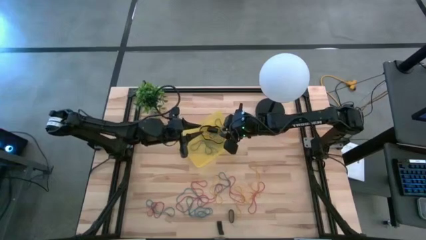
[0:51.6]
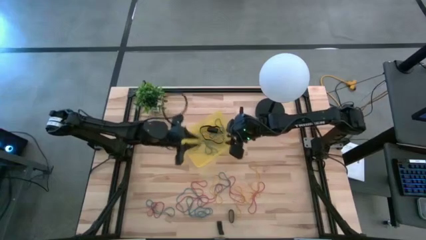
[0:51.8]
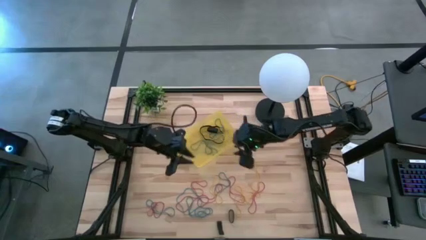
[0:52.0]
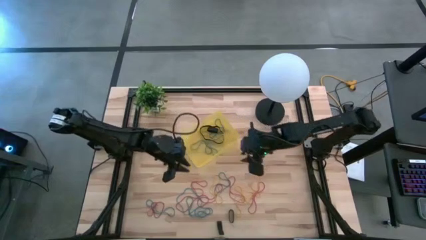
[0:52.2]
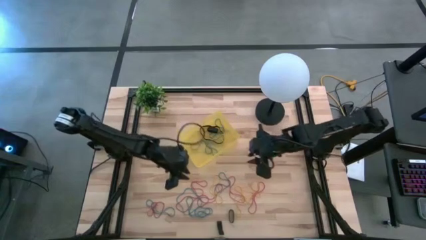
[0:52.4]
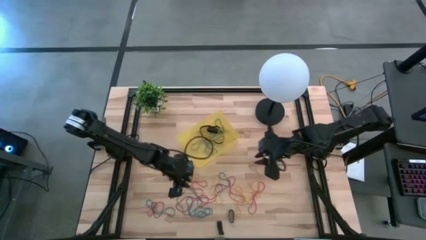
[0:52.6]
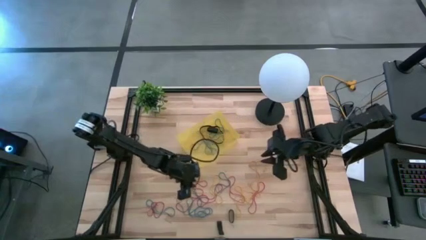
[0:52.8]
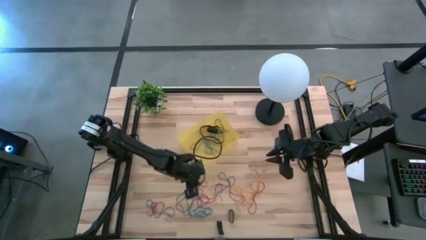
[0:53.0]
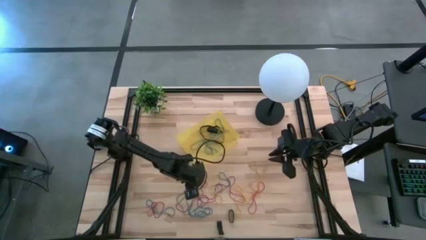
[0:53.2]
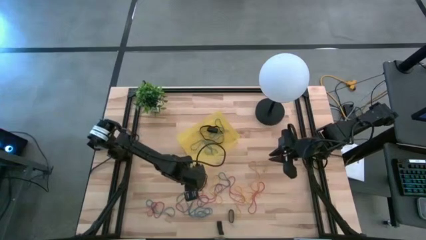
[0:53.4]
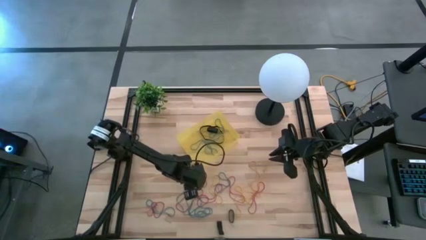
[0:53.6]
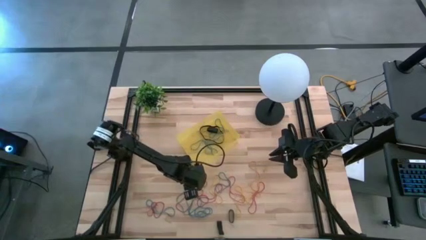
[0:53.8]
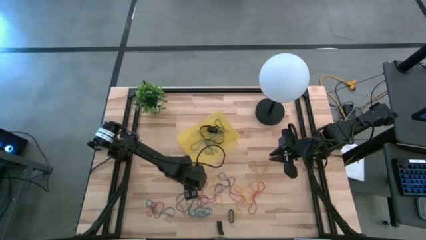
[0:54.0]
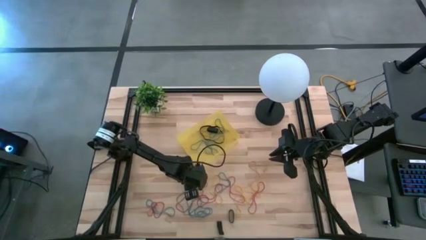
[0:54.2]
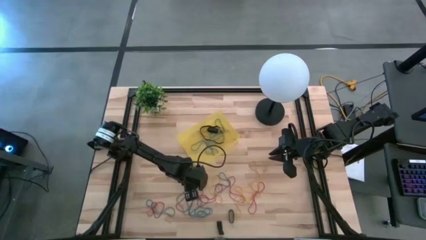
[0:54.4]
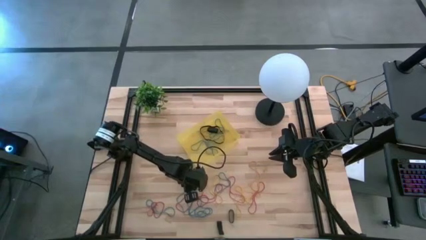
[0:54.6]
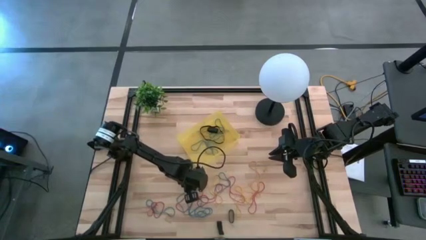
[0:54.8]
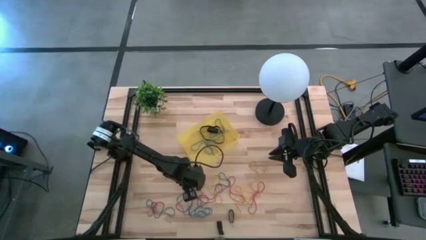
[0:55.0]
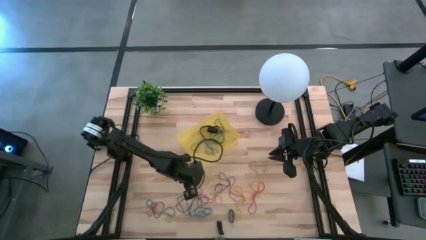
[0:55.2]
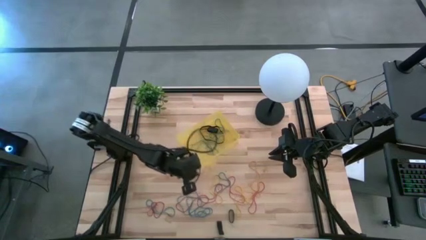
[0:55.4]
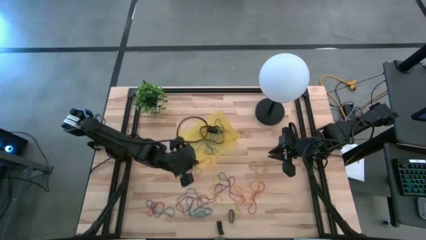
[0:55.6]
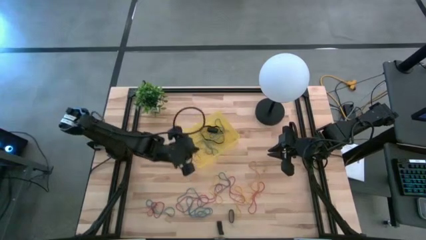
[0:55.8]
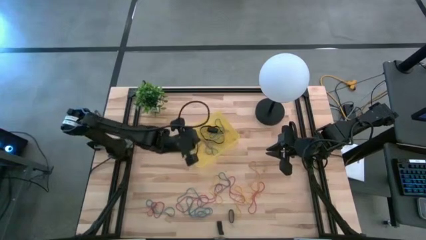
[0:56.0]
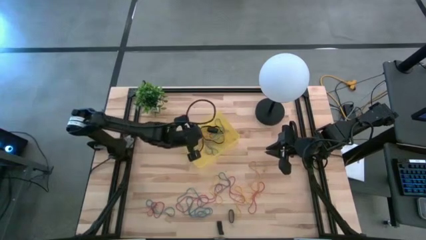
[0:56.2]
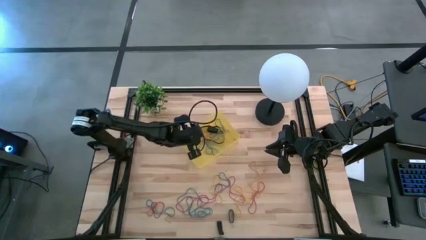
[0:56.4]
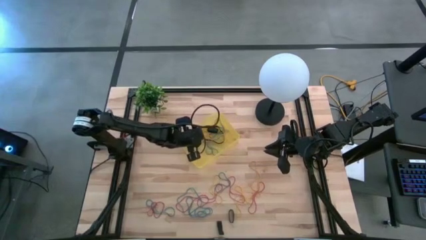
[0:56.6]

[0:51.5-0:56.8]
Task: Pick and place rubber bands into bin
Put the red rubber band into the yellow bin

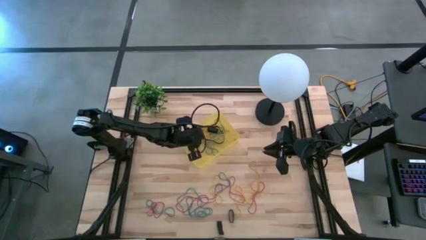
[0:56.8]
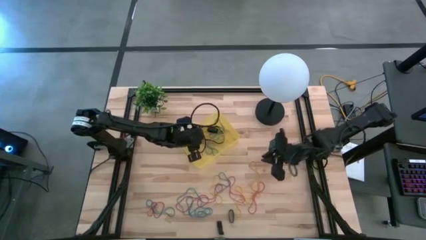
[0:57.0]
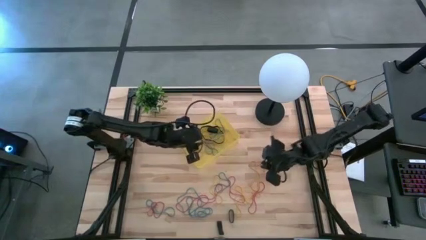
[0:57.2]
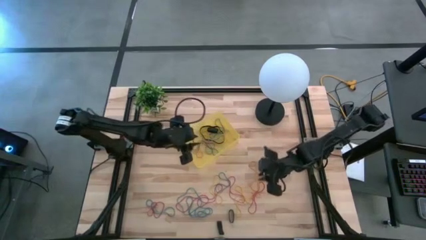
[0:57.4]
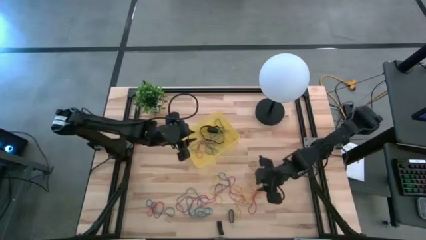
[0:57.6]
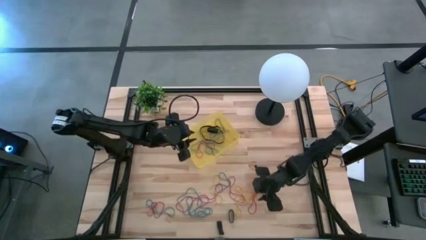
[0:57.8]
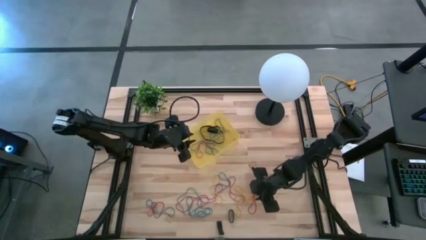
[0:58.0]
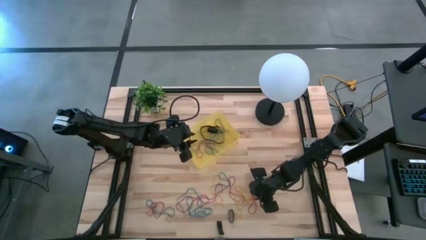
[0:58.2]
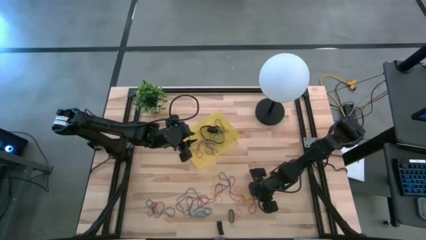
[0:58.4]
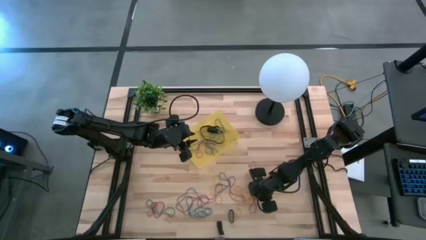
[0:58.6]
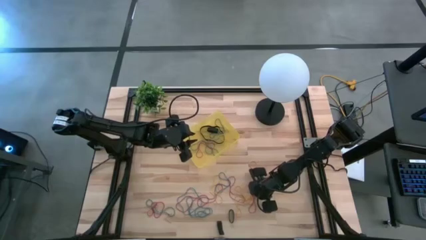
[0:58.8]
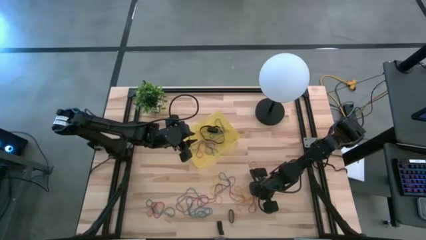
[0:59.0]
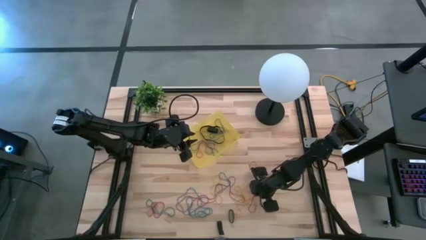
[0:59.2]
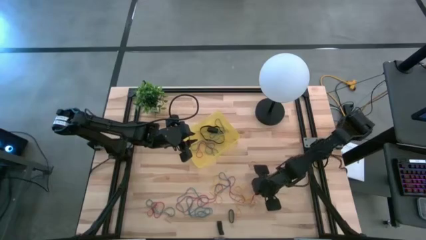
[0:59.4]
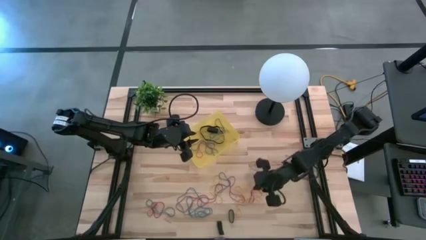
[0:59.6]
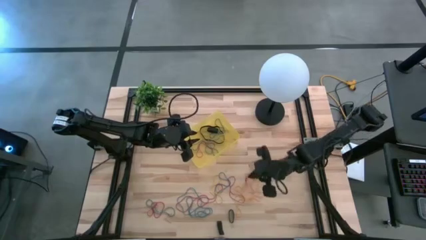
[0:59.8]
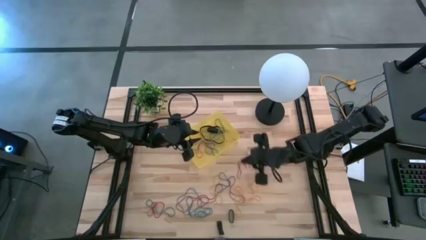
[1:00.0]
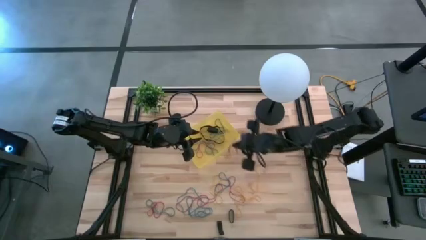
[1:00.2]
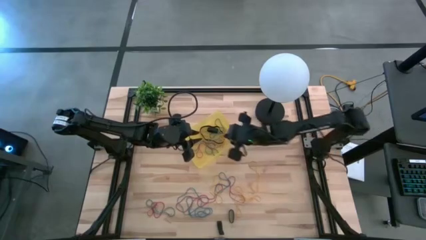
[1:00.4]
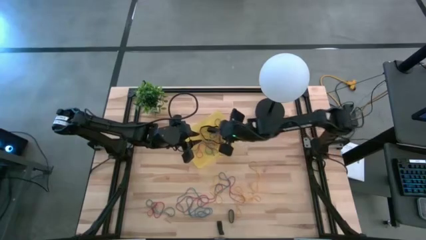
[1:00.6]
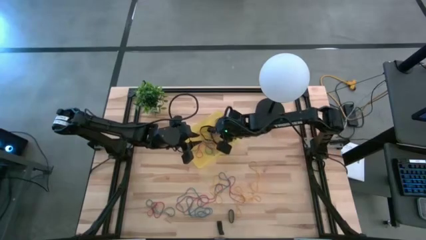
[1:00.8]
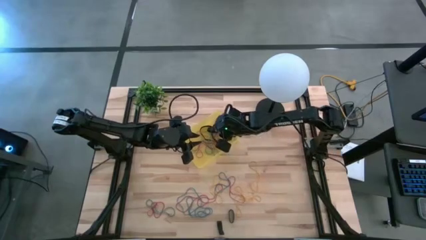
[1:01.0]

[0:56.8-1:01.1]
Put the red rubber band into the yellow bin

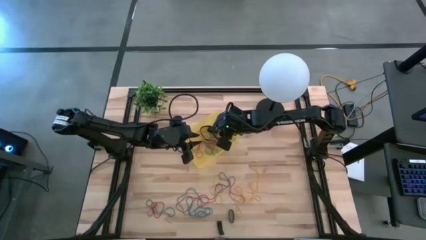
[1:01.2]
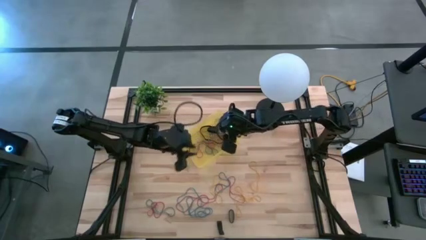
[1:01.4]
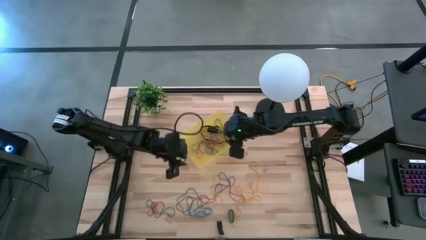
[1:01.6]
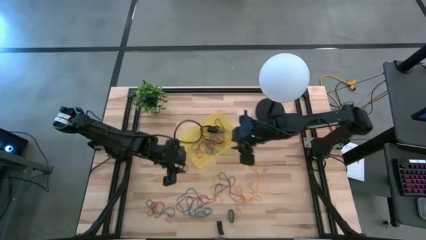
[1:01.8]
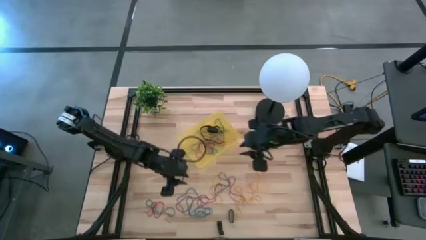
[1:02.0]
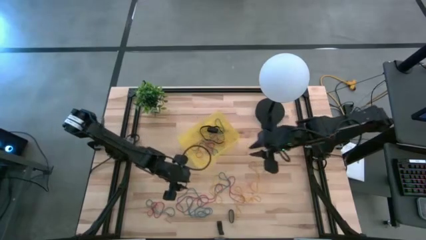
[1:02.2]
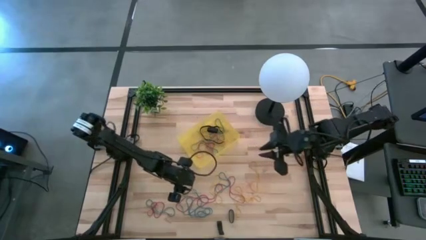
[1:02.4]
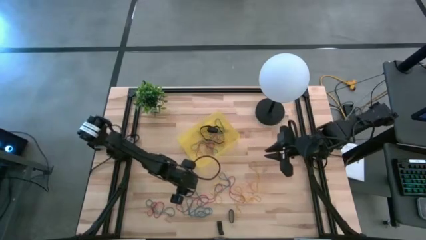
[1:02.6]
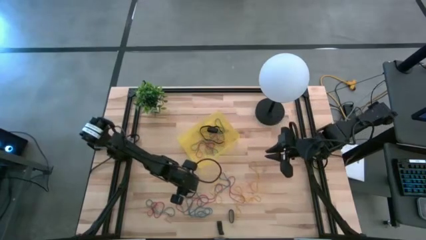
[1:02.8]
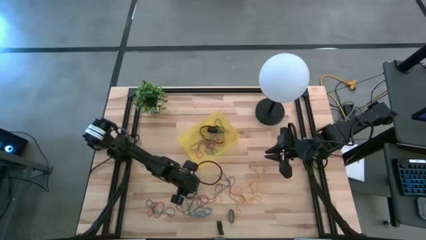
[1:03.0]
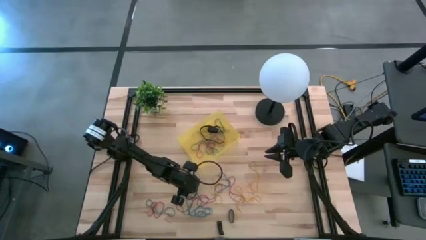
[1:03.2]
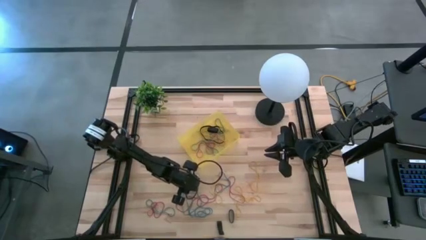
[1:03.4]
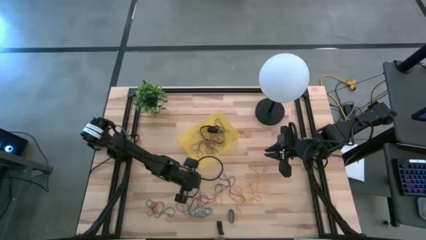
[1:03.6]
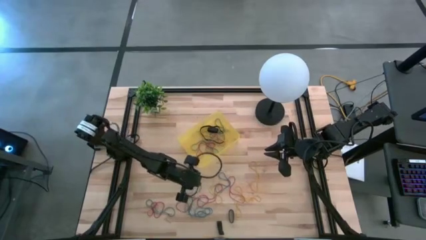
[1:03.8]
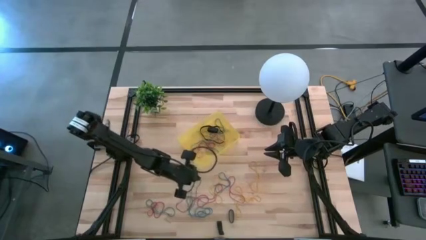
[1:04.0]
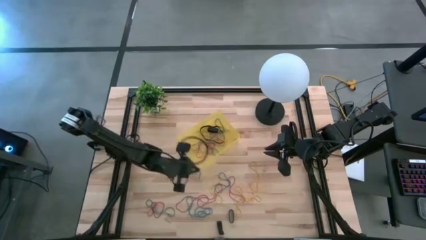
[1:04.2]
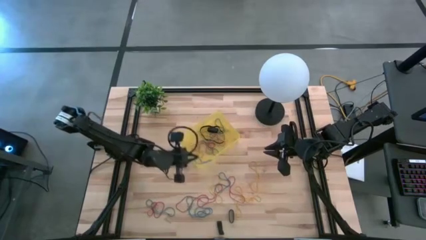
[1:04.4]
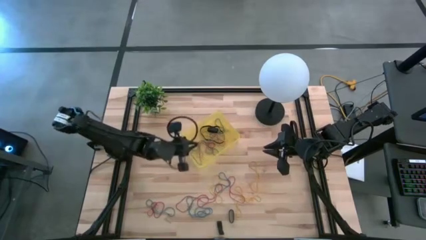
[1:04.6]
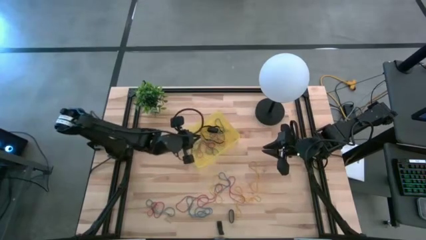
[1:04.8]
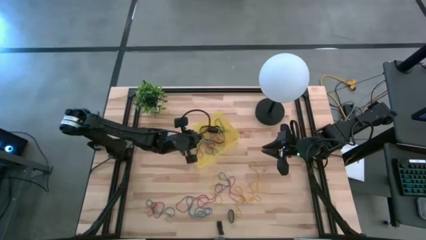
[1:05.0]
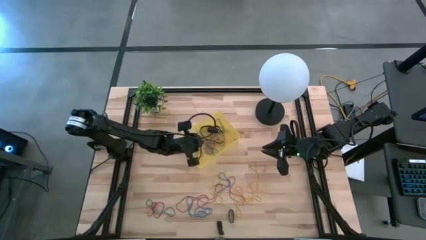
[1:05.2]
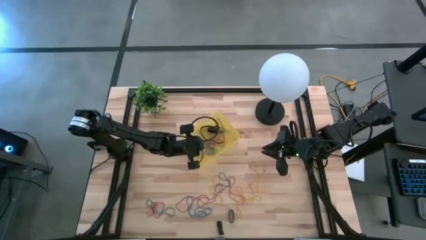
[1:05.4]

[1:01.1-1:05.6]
Put the blue rubber band into the yellow bin

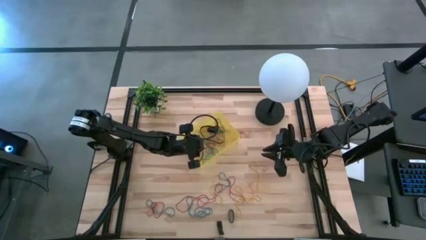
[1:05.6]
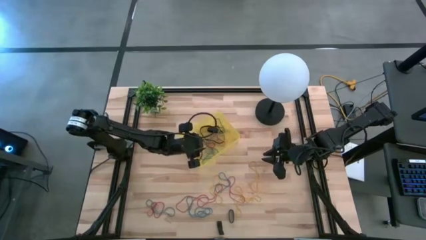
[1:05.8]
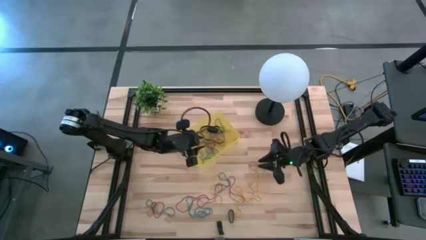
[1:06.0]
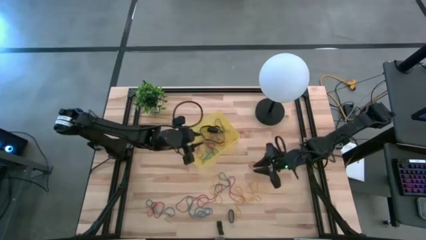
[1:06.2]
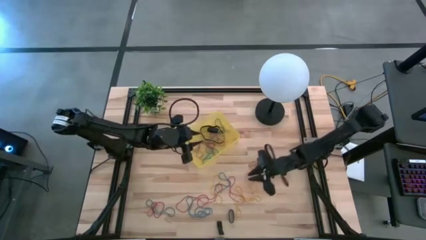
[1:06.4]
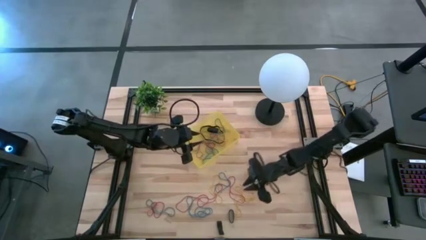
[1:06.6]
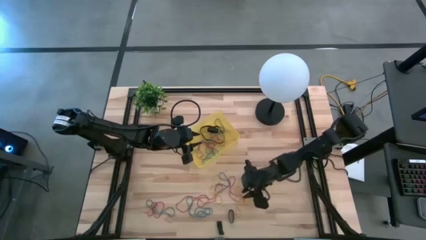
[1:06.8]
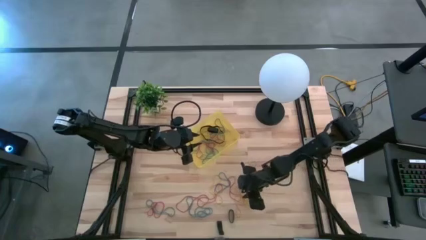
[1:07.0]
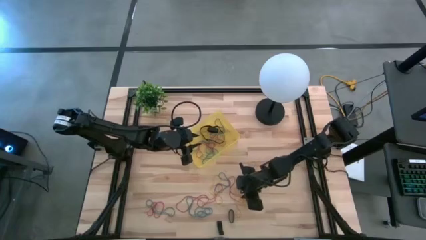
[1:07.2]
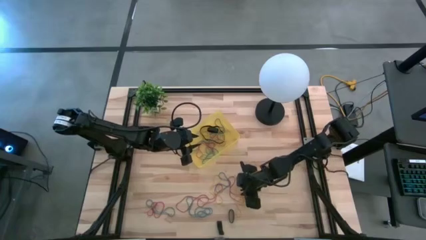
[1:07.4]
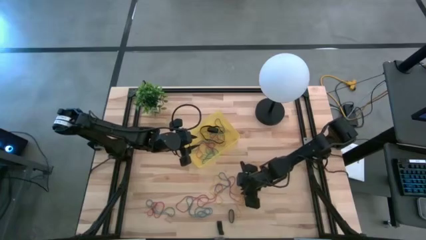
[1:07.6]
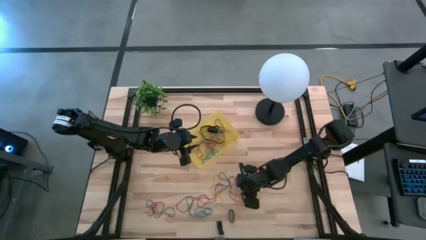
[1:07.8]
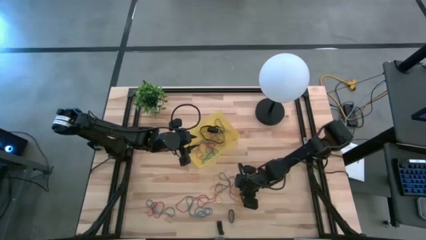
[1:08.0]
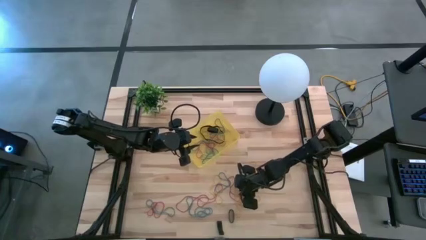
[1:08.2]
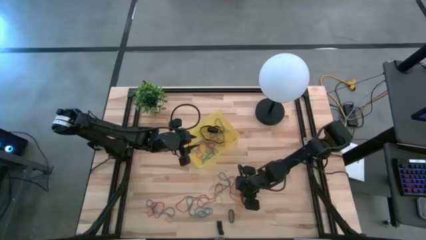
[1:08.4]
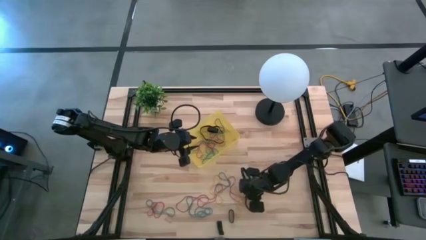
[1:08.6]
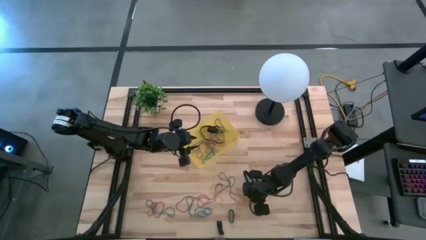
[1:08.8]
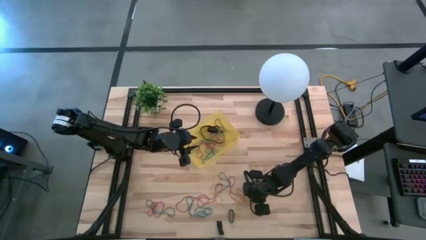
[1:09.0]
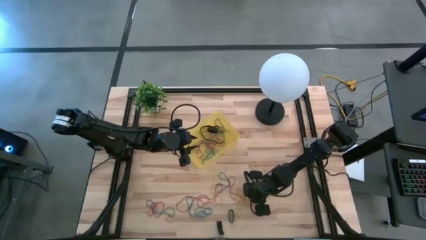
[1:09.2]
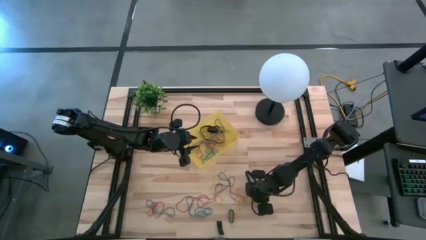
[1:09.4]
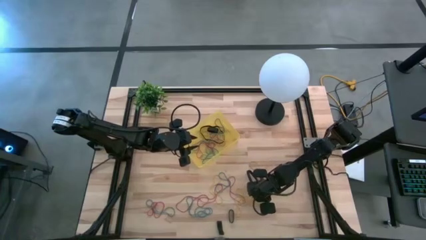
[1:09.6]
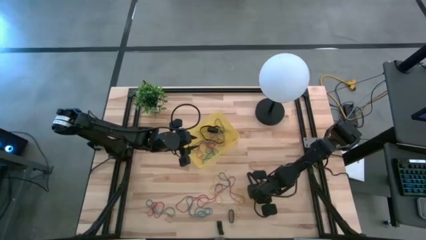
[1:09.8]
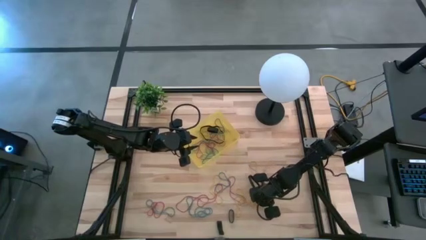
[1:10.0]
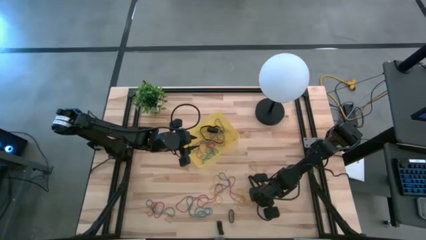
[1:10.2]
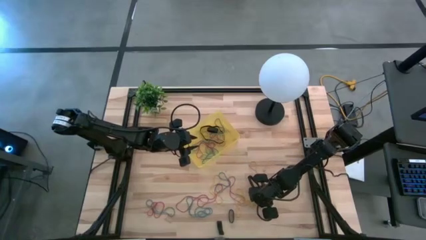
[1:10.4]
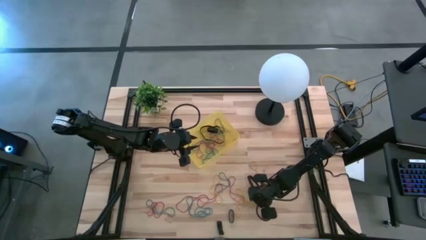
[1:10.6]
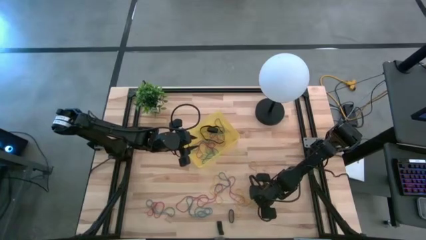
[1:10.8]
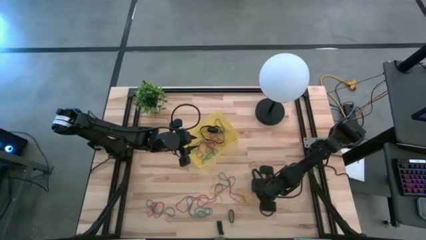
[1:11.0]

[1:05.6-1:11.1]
Put the yellow rubber band into the yellow bin
